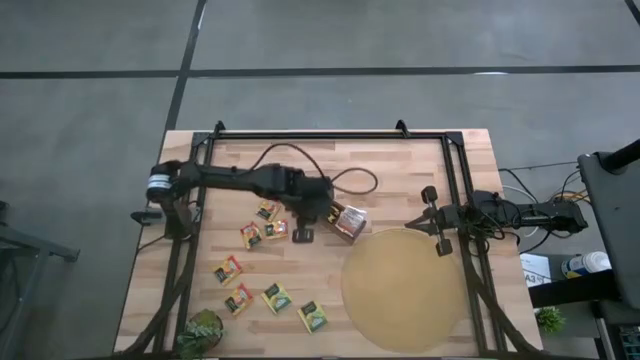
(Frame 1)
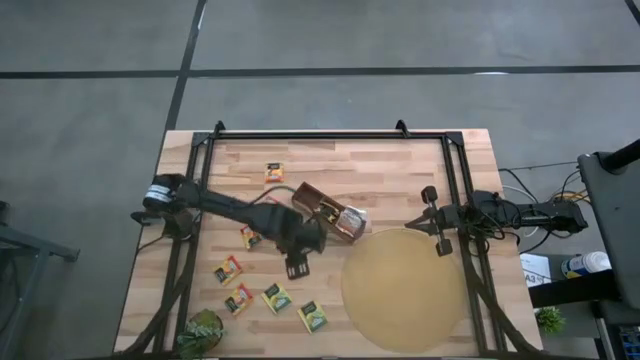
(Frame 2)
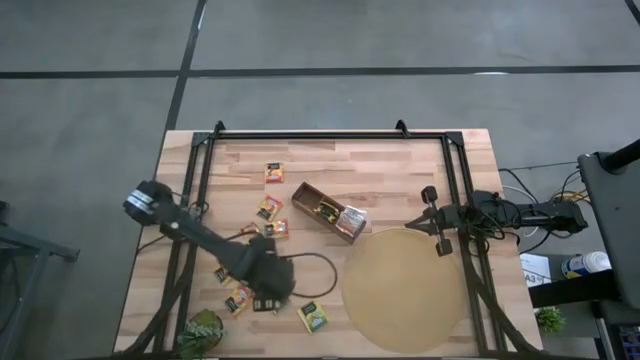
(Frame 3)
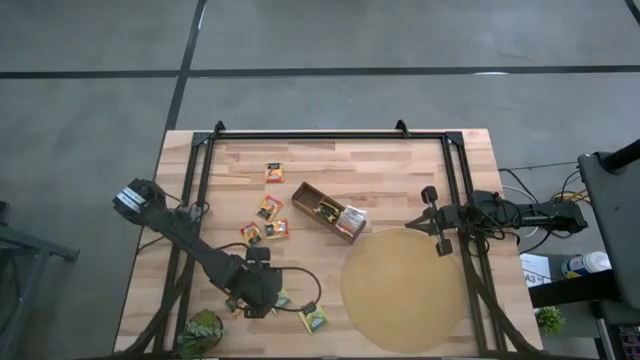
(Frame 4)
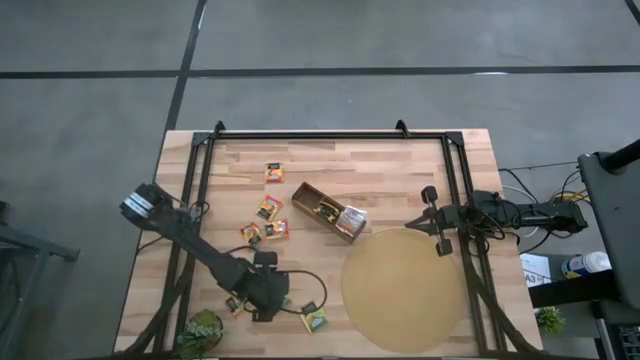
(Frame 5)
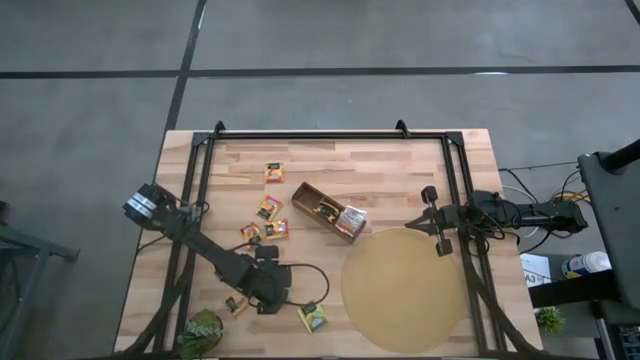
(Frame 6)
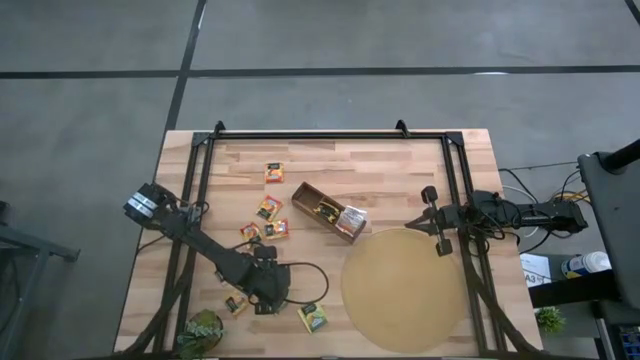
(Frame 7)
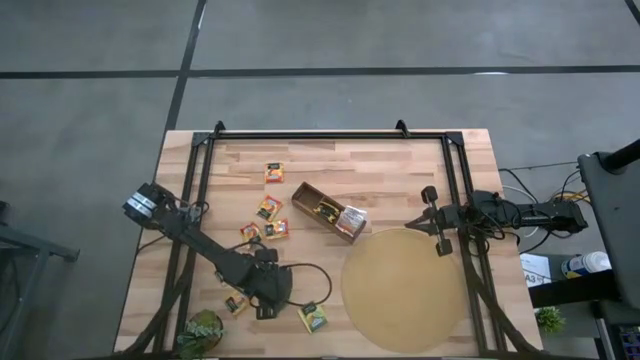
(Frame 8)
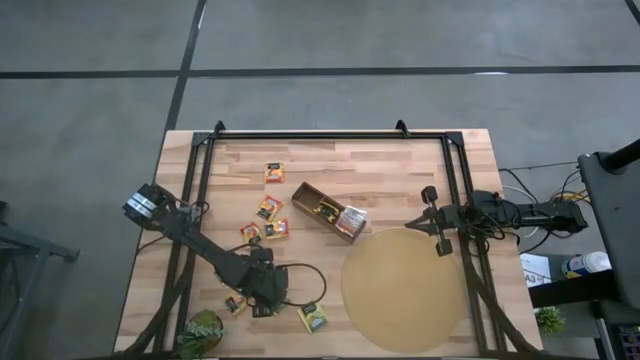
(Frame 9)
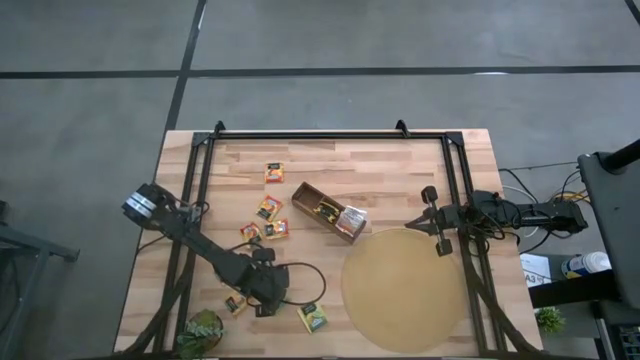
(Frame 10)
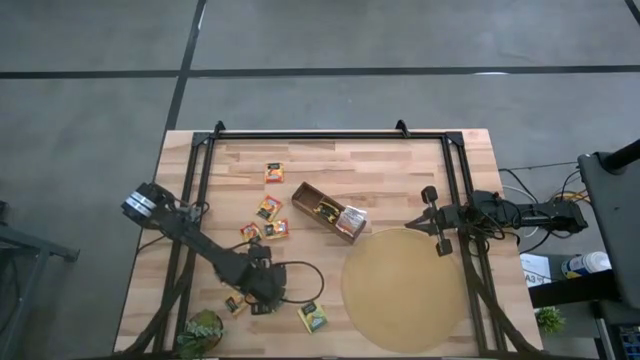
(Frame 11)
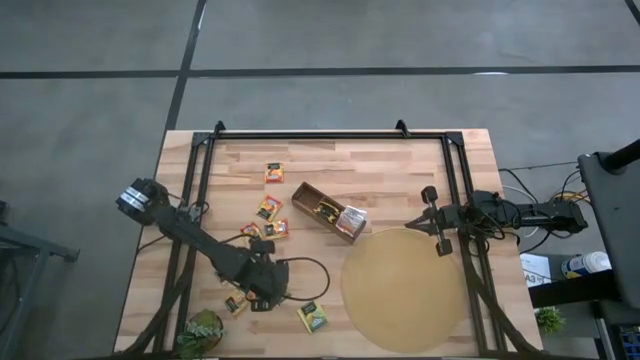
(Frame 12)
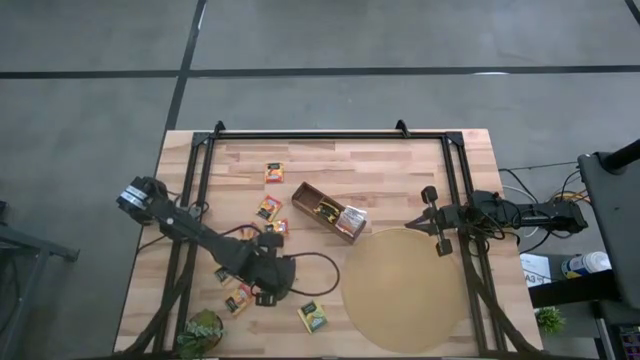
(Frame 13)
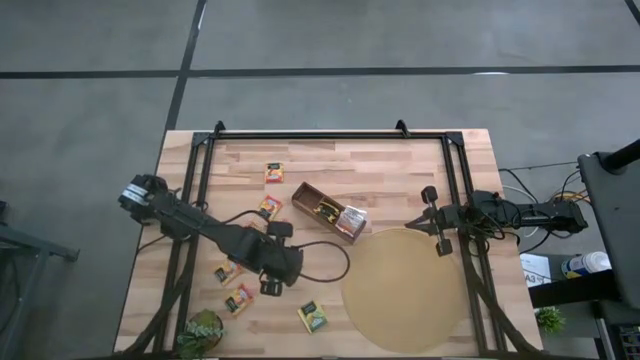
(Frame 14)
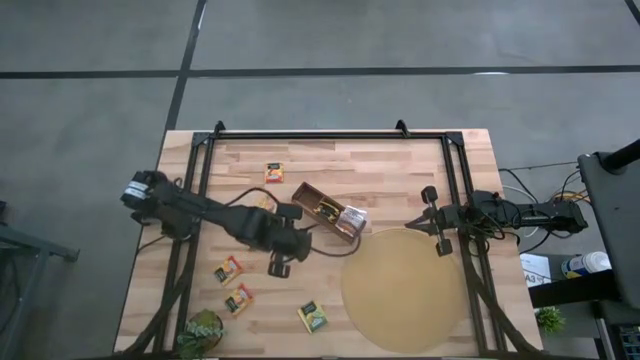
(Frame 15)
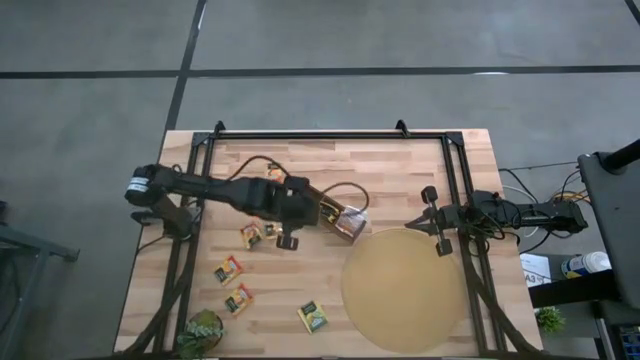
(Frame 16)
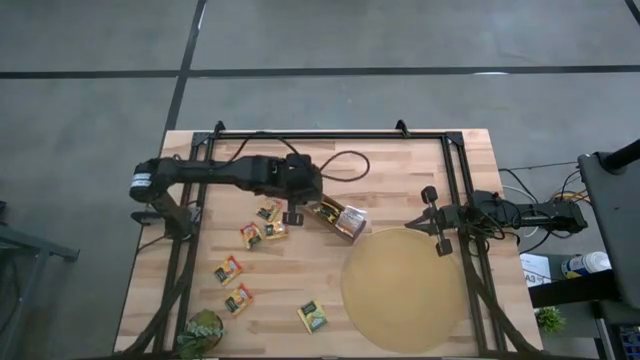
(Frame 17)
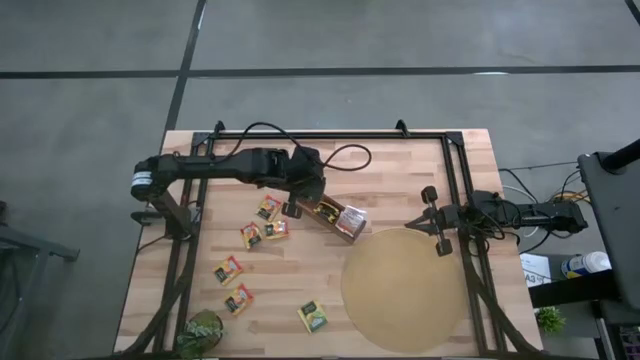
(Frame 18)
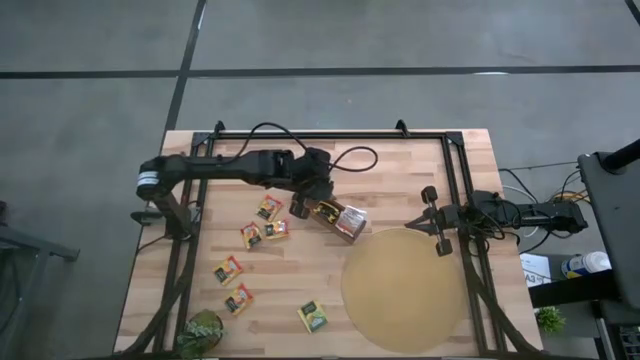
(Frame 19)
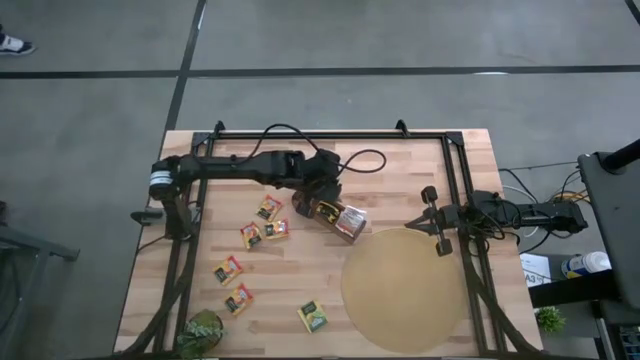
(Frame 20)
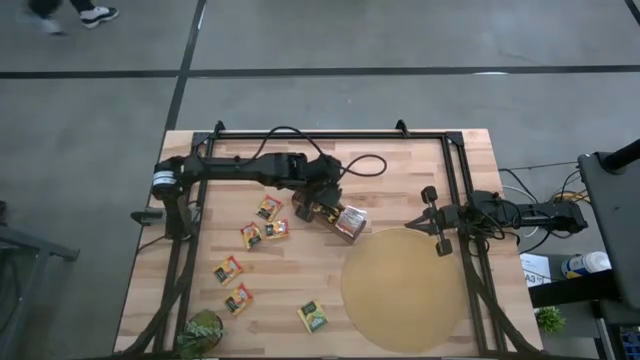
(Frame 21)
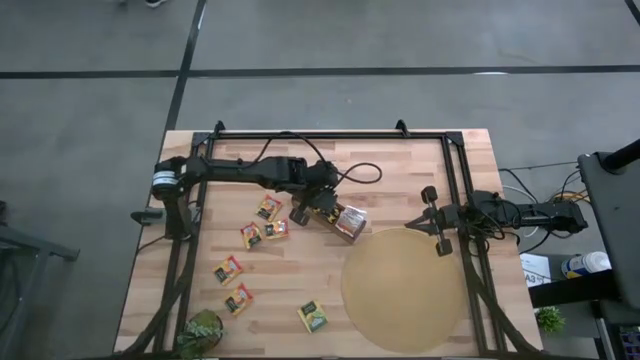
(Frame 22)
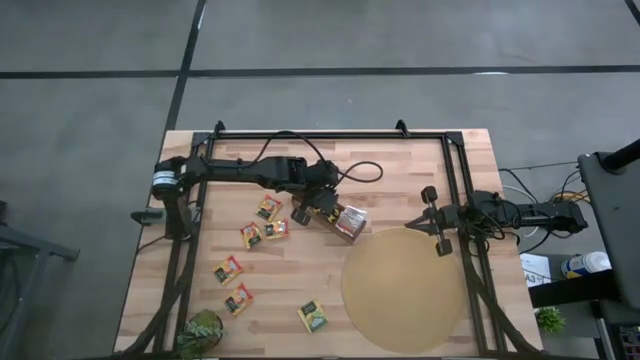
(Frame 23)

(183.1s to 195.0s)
Task: Pick & Place Tea
Put the yellow tea bag into the middle section of the wooden organizer

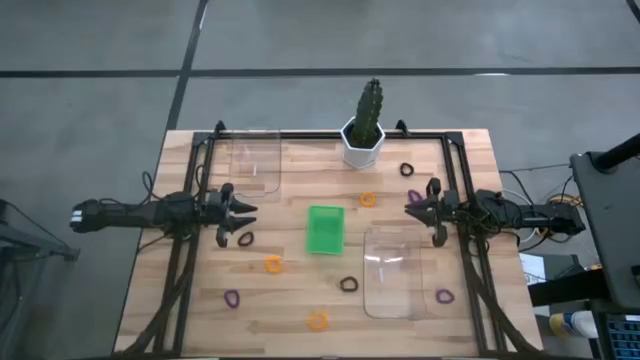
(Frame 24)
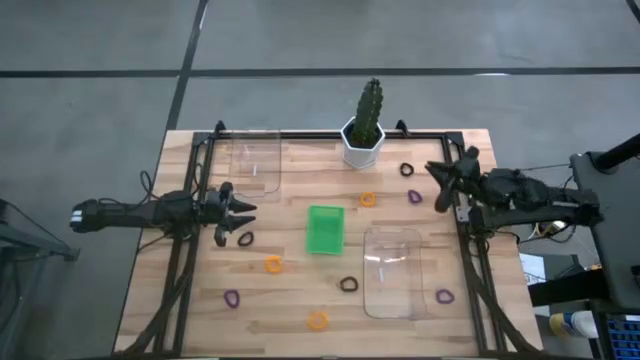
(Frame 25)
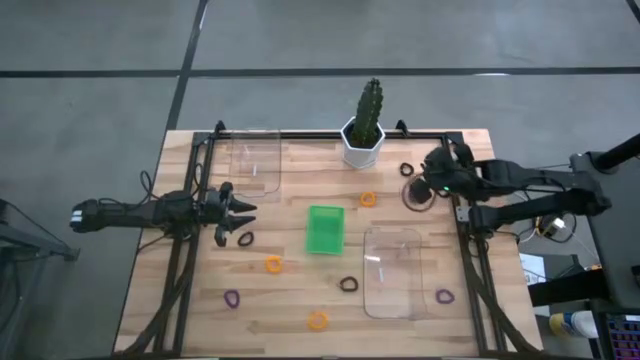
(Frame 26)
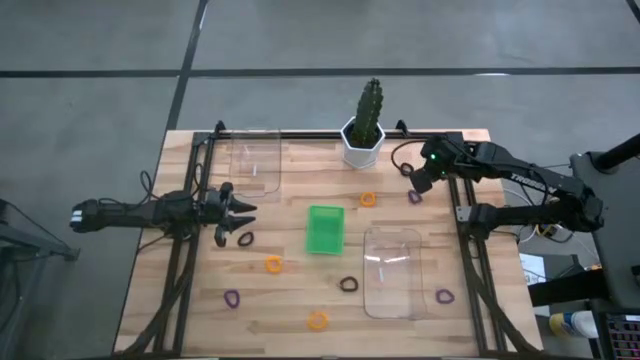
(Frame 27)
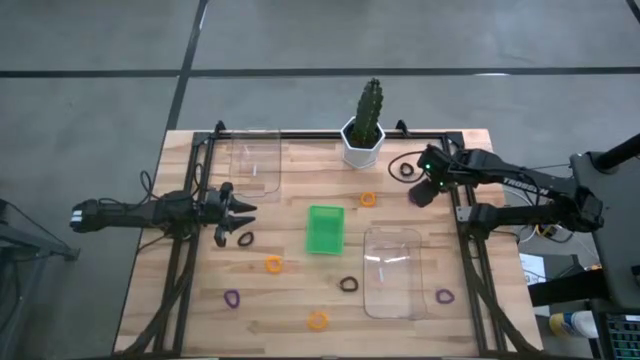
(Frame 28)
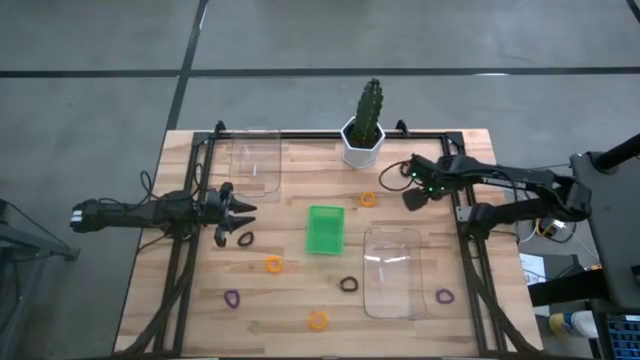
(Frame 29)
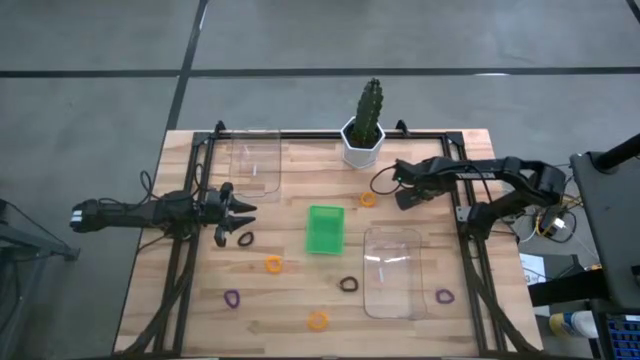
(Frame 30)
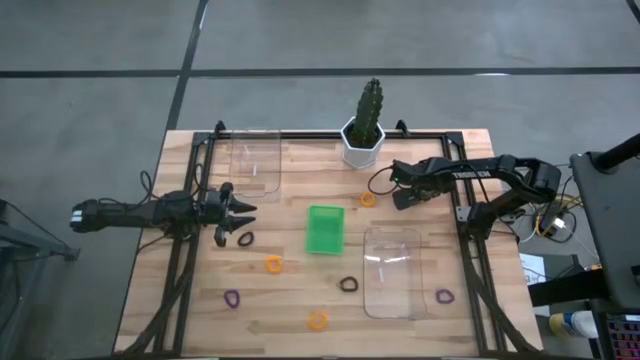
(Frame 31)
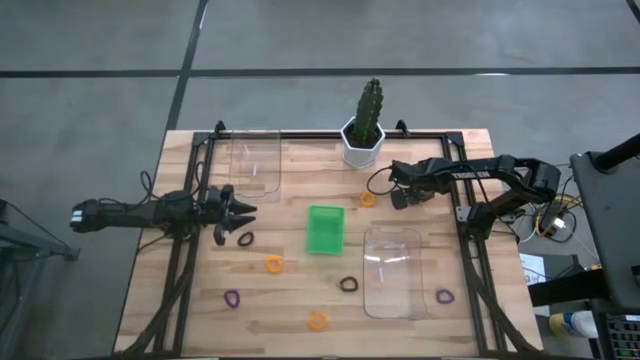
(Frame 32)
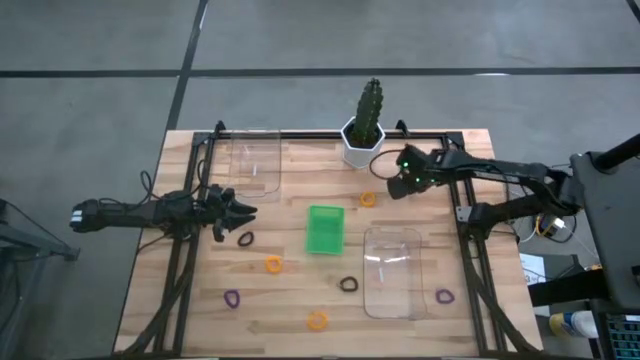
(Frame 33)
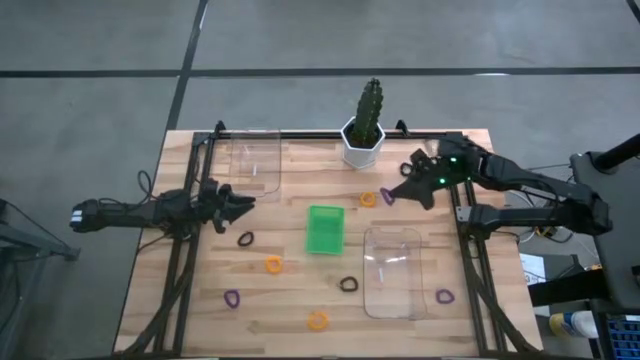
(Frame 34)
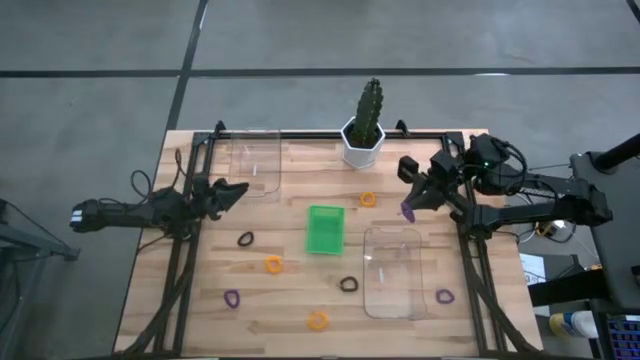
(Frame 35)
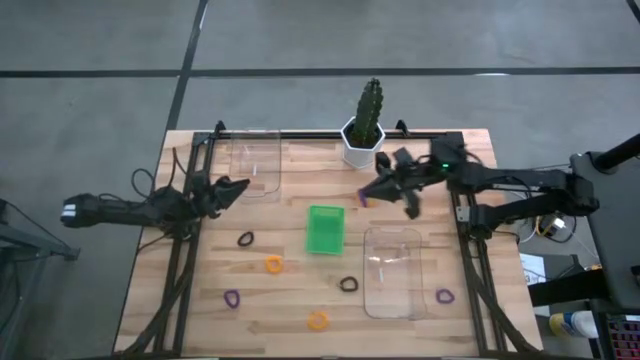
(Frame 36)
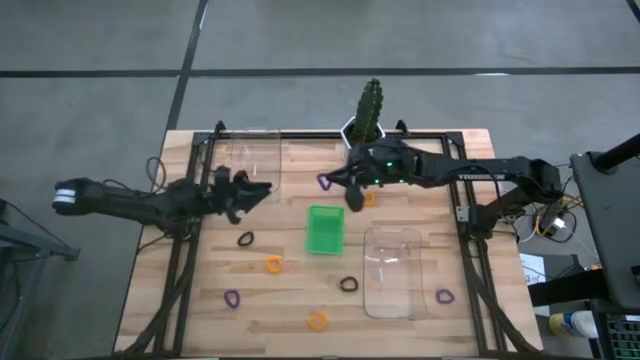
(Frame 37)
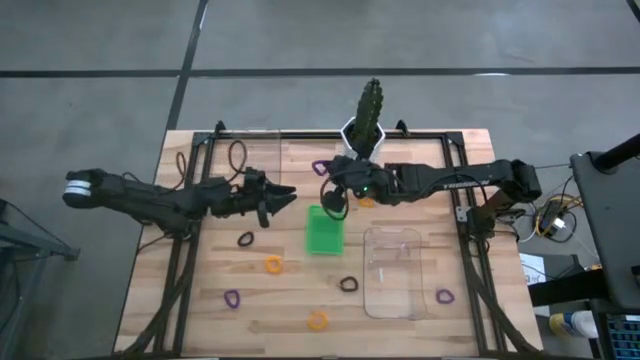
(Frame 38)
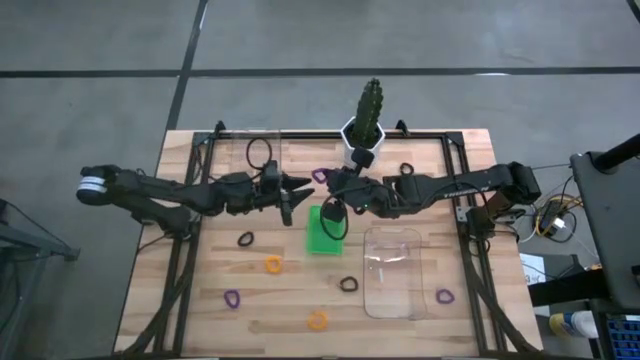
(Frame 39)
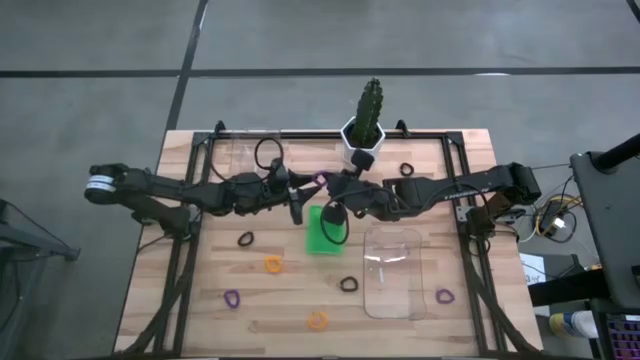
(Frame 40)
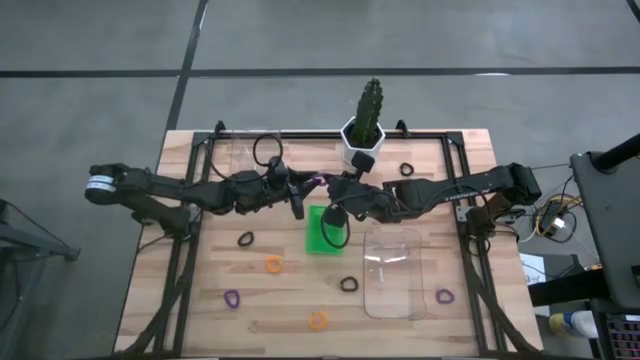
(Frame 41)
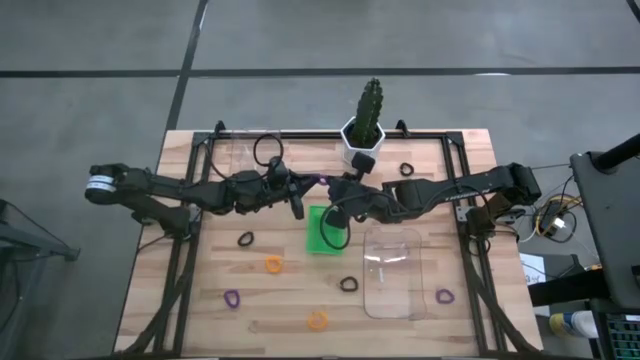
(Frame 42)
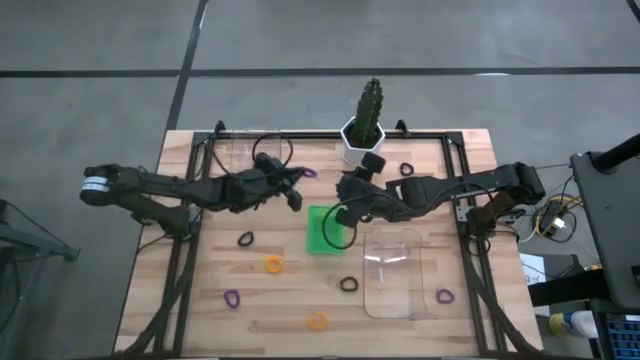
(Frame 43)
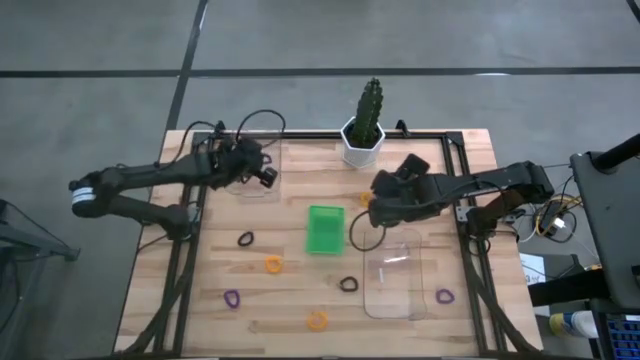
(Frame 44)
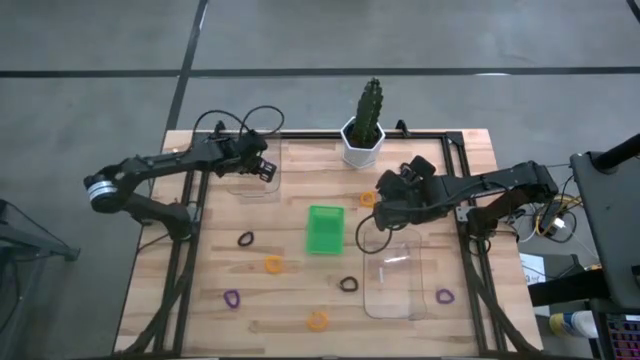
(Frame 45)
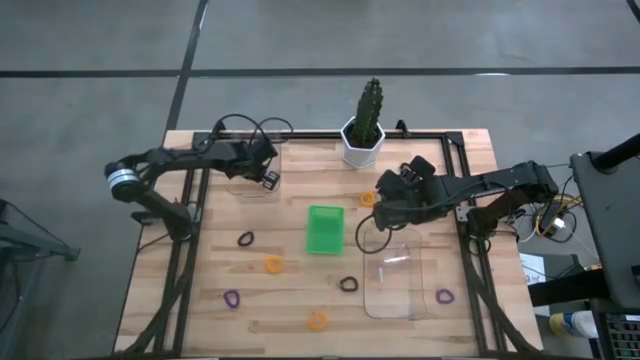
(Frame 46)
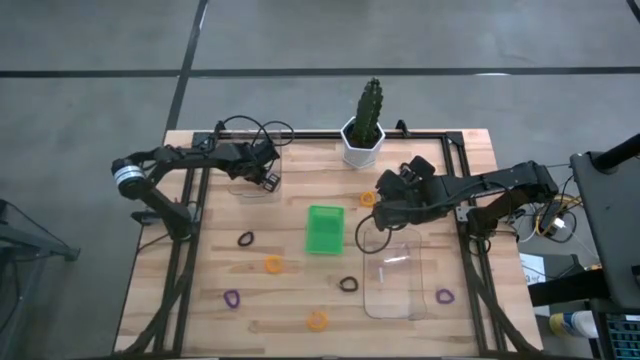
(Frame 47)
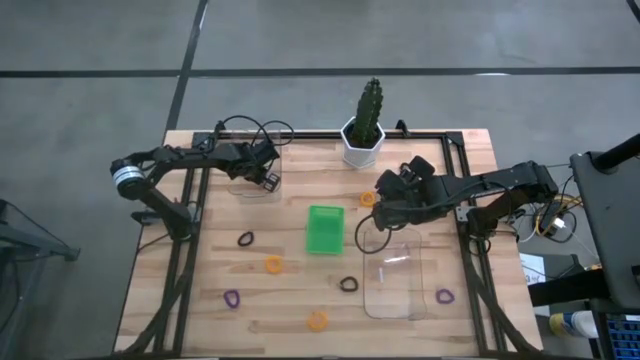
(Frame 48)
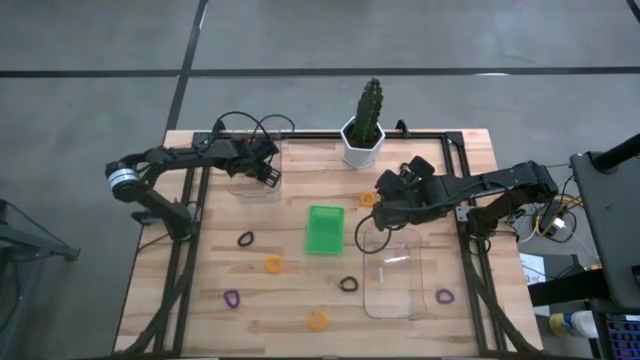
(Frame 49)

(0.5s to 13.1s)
Task: Sort spring keychains
Put the top purple spring keychain into the top transparent bin
